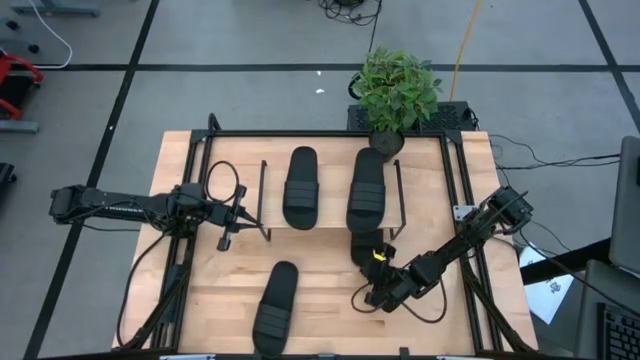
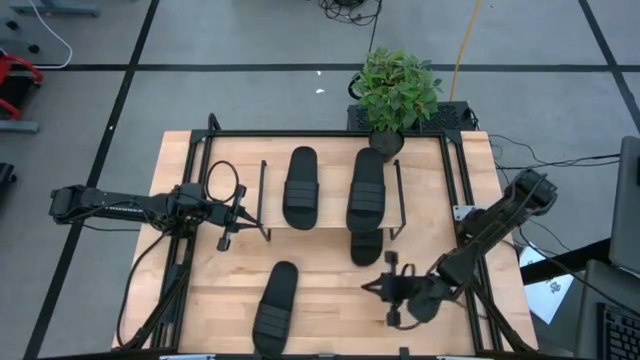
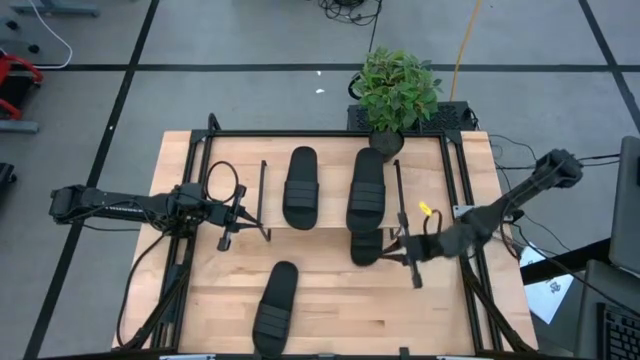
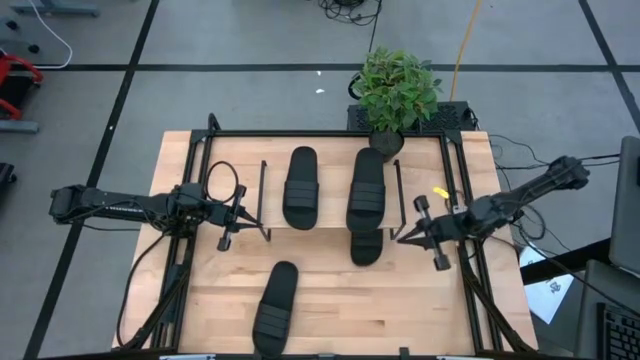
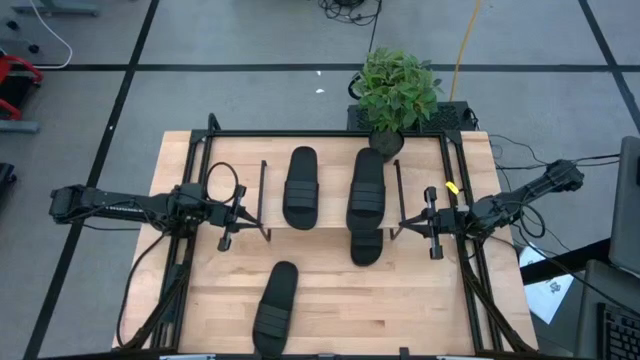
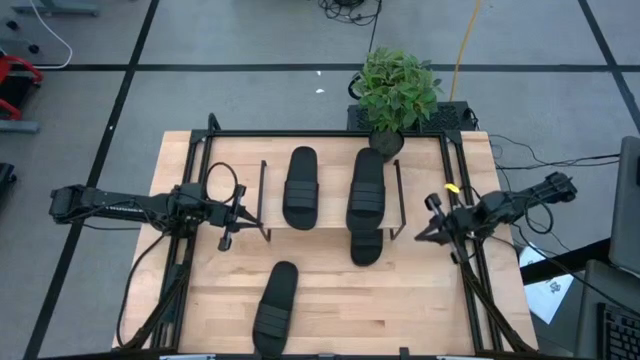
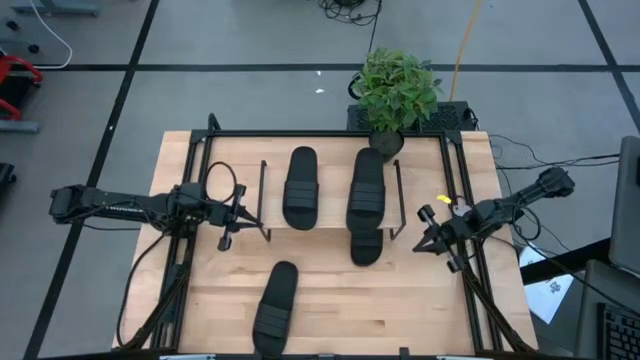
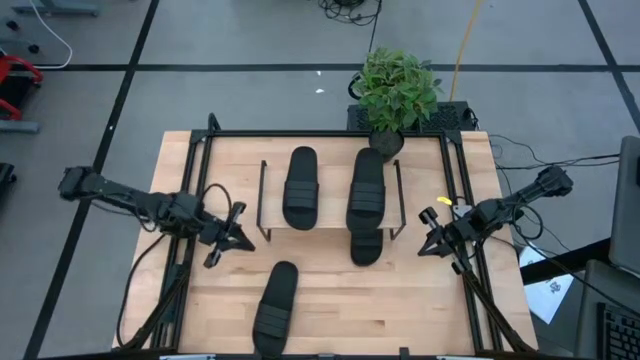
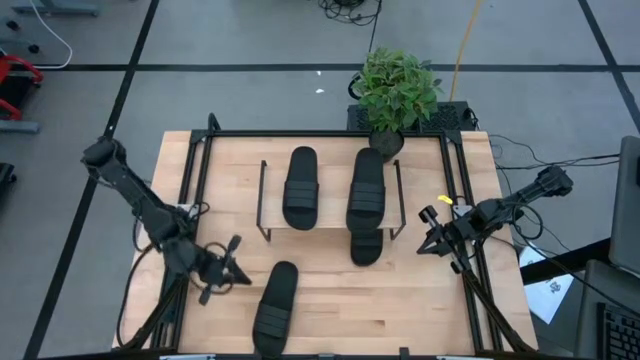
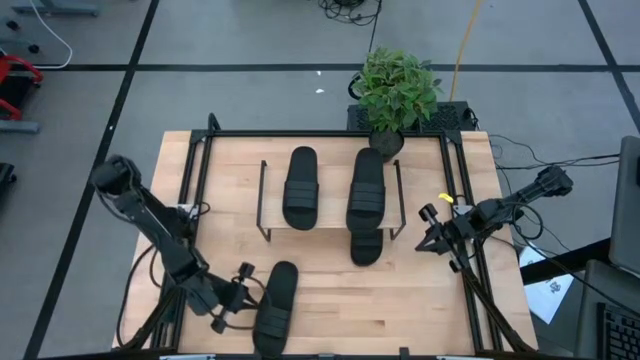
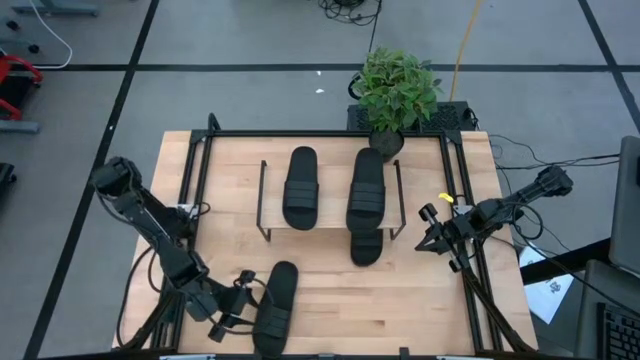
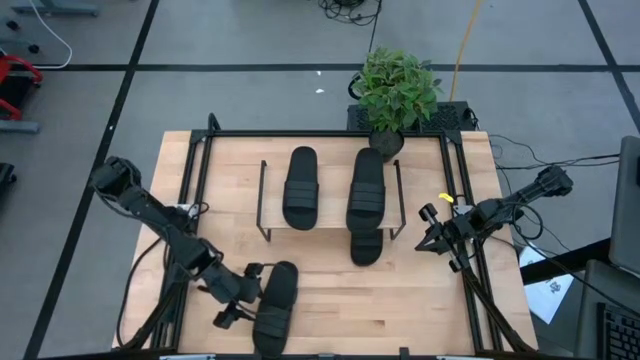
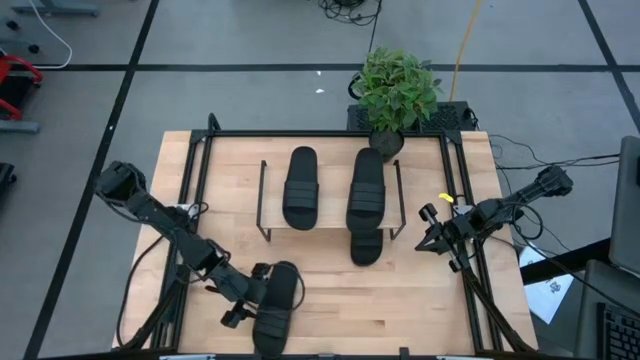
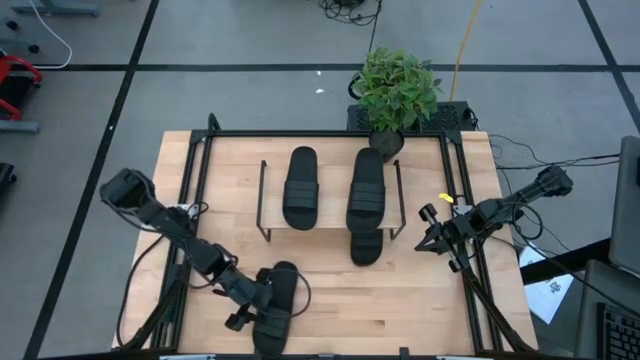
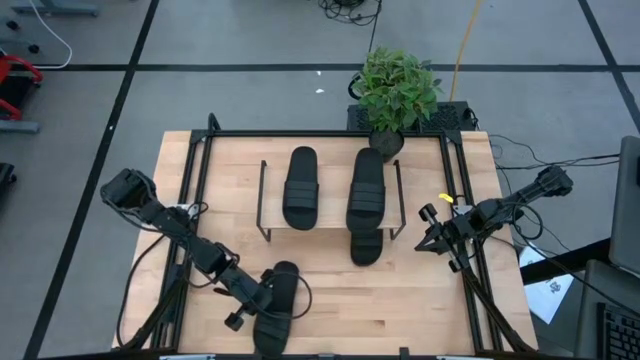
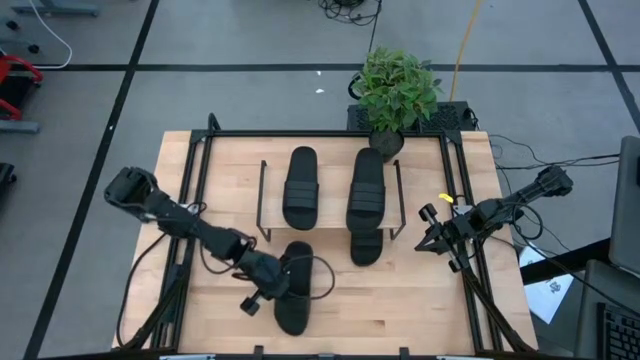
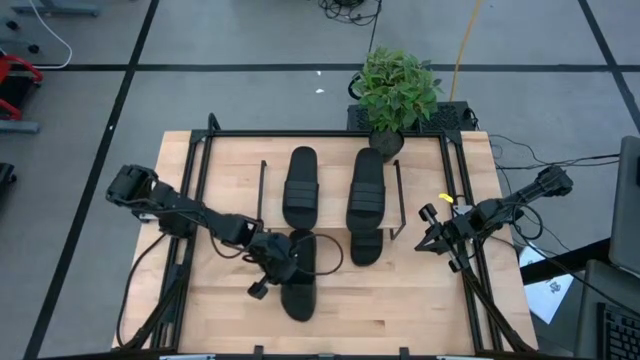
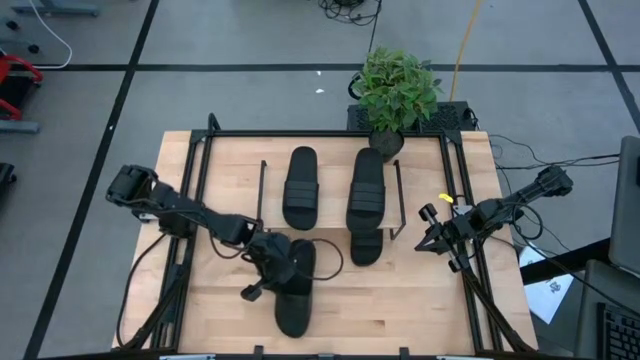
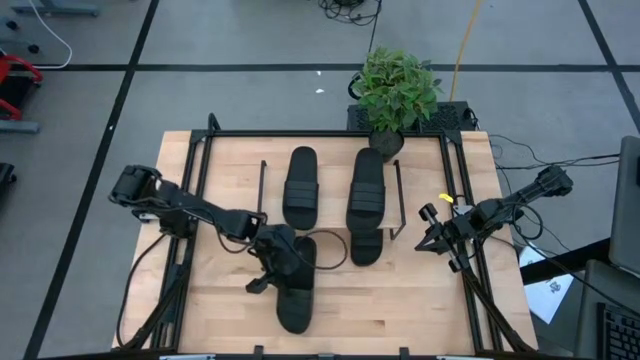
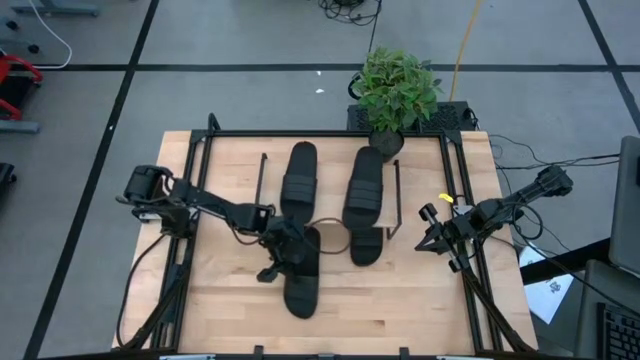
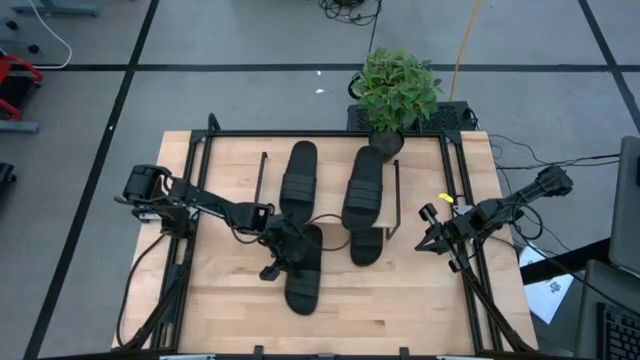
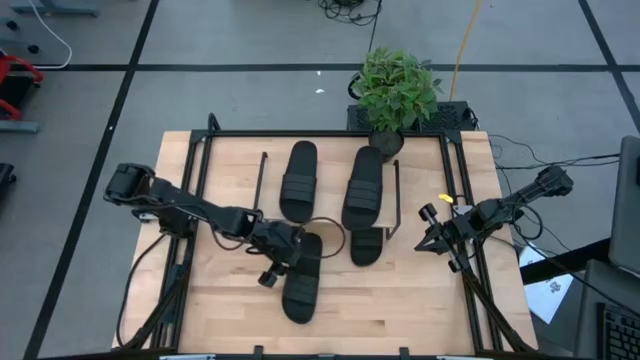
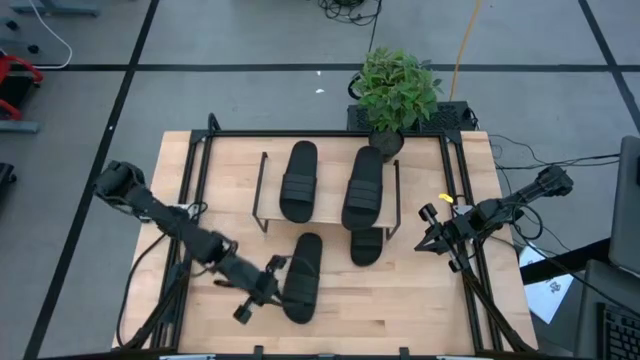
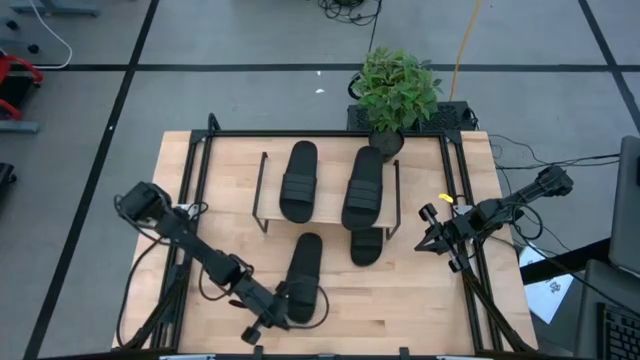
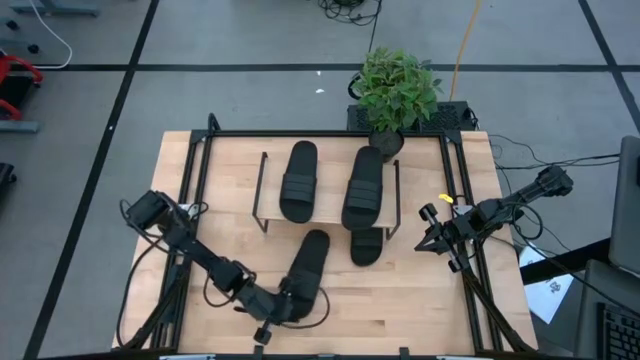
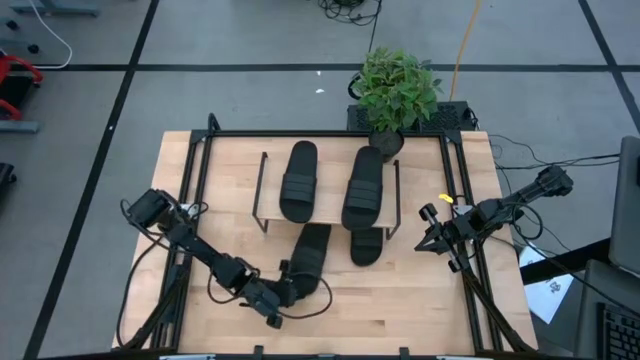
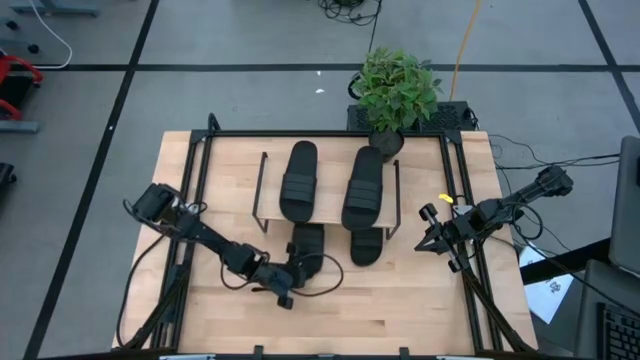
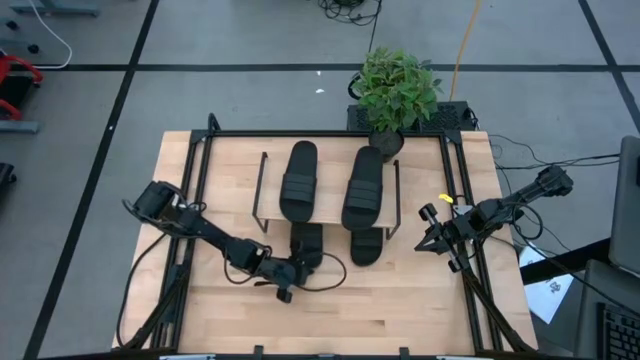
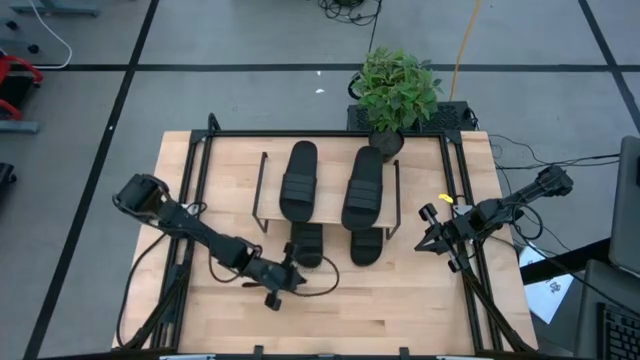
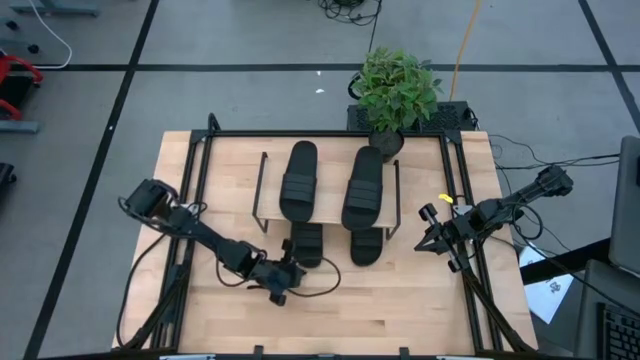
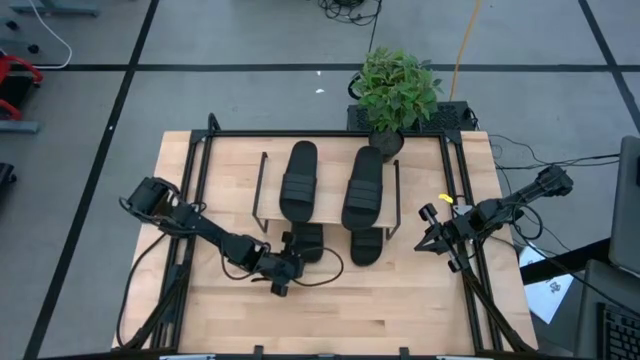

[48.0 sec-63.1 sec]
Task: Pick and place slides into the shelf
Put the black slide under the shelf

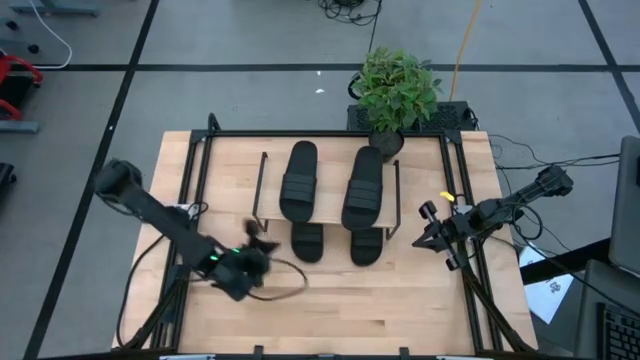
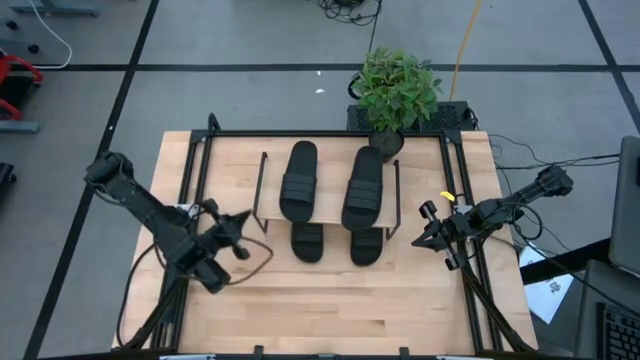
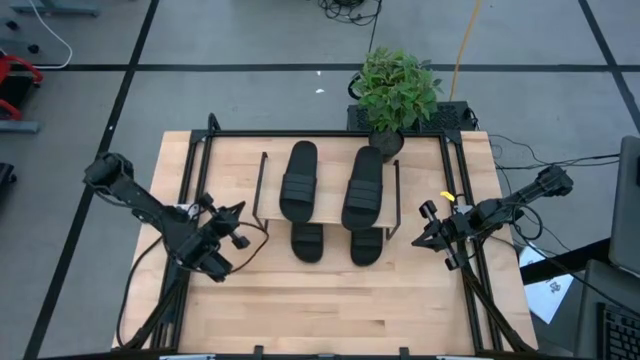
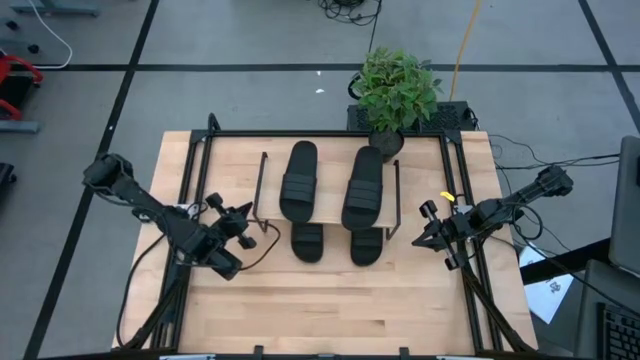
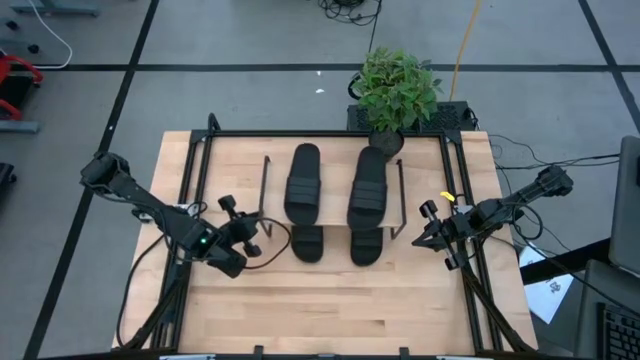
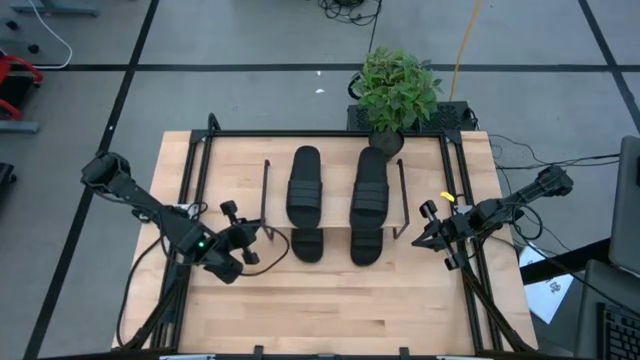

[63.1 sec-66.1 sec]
Adjust the shelf

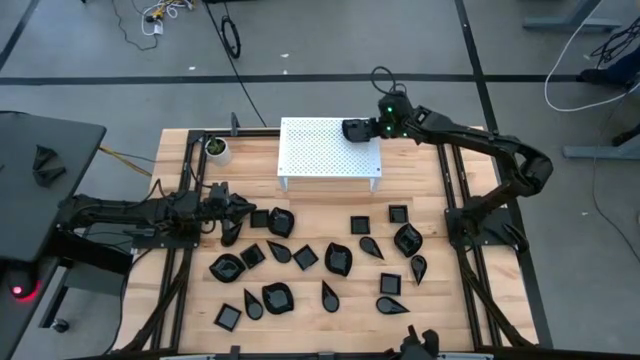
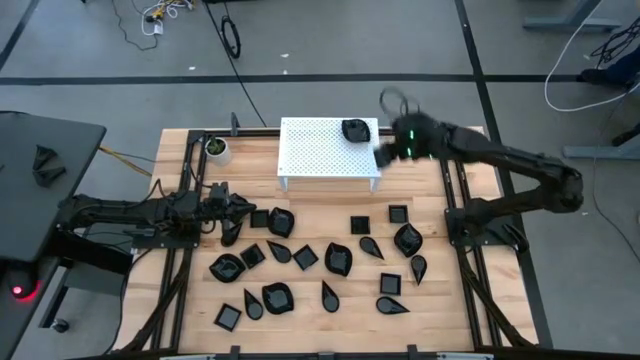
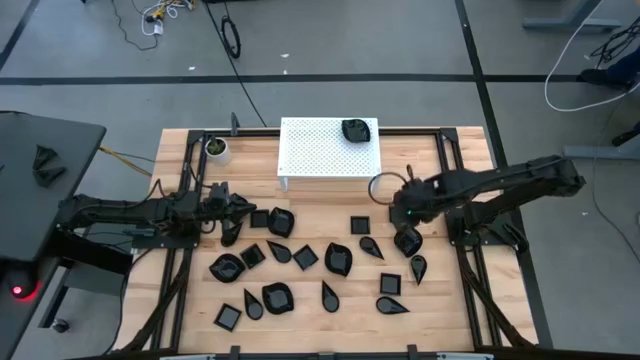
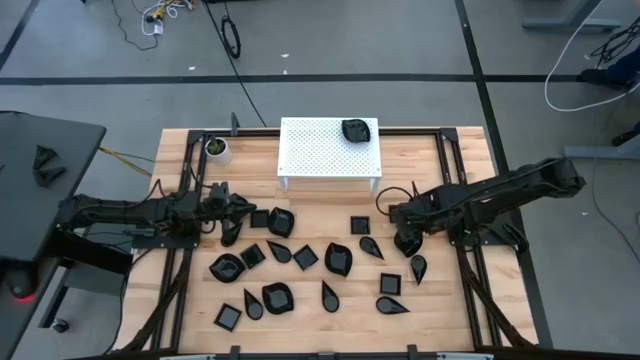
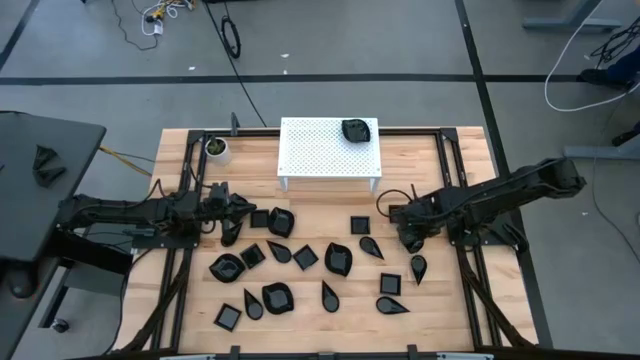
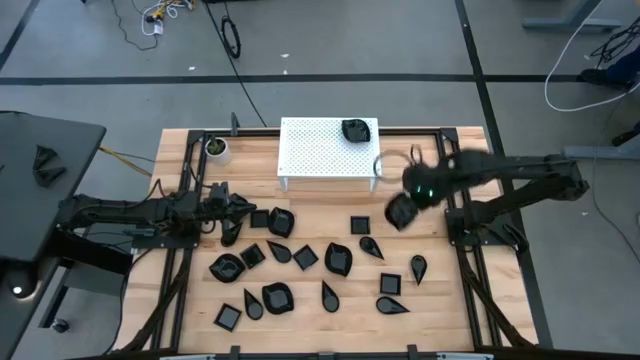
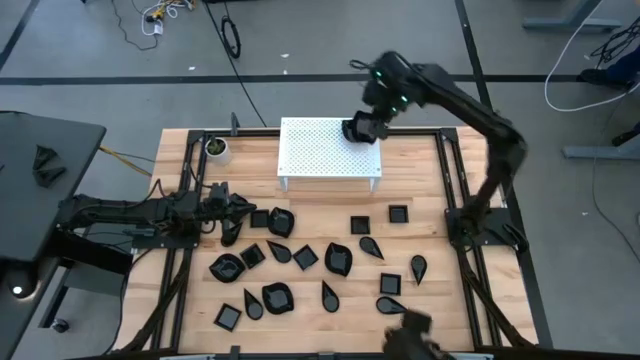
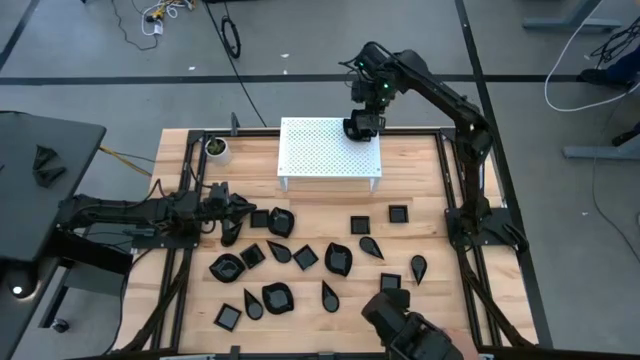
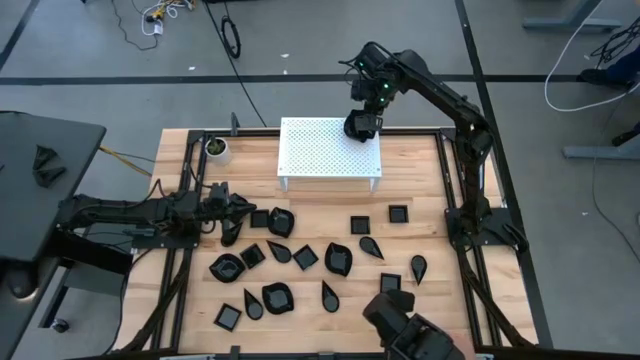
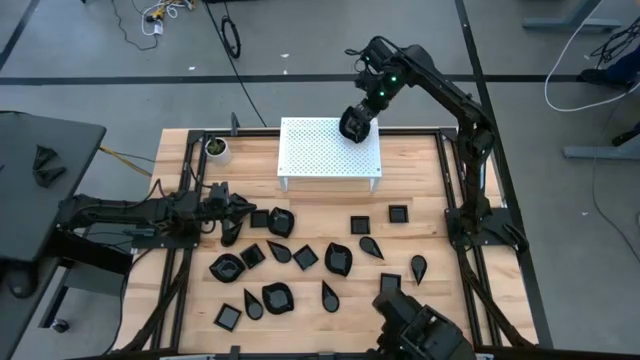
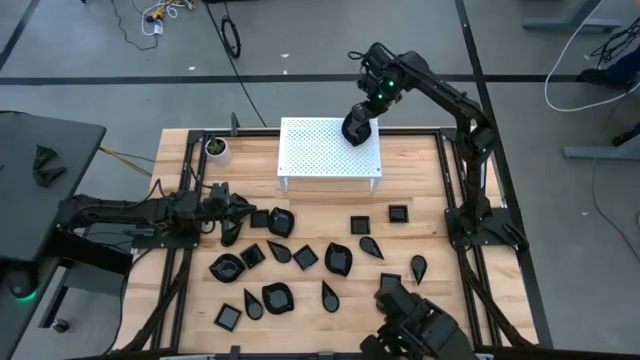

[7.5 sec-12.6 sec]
Task: Pick & Place Mini shaped plates
Stack the black leaf-shaped plate on top of the other black leaf-shaped plate on the shelf
